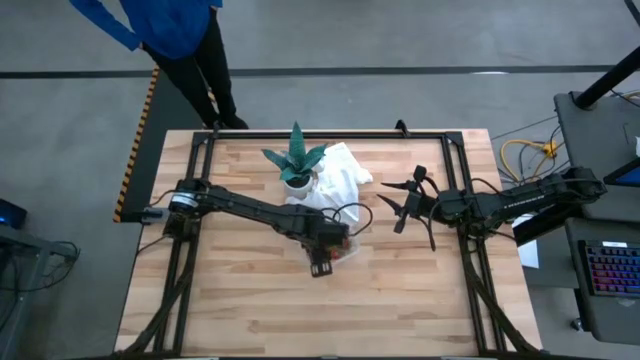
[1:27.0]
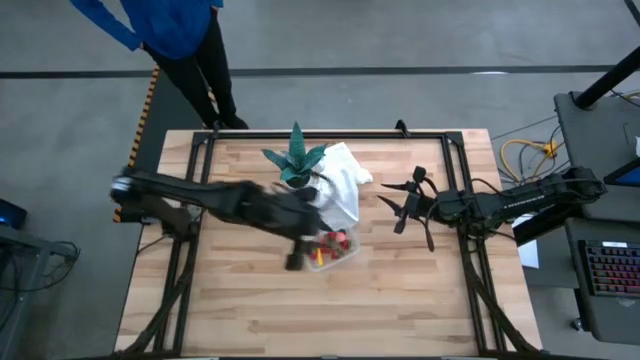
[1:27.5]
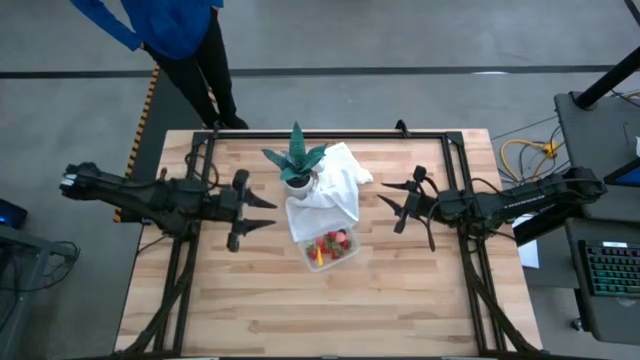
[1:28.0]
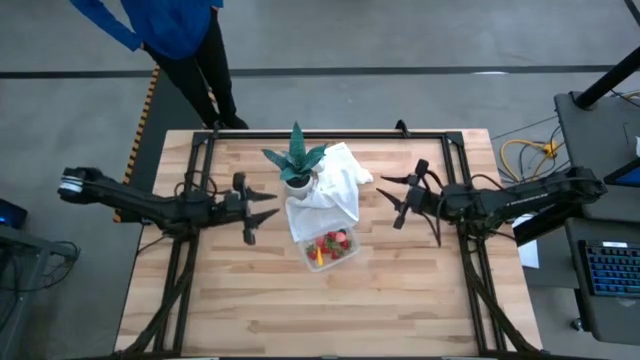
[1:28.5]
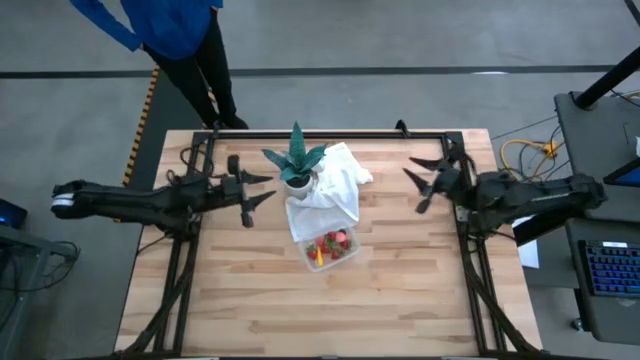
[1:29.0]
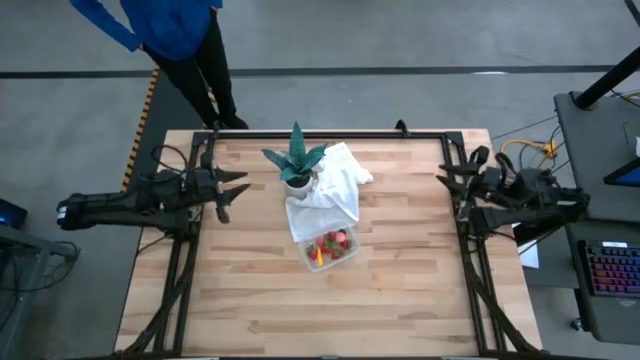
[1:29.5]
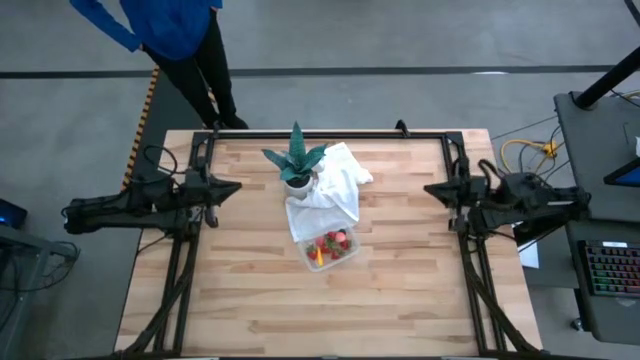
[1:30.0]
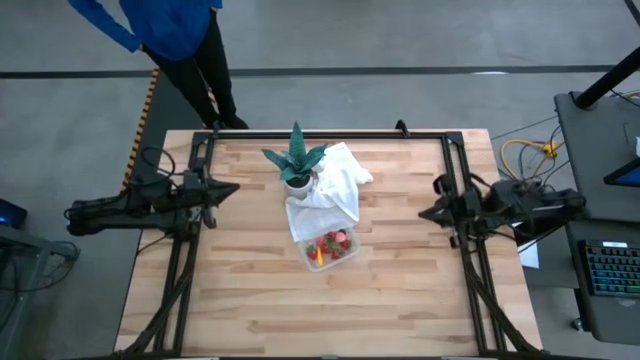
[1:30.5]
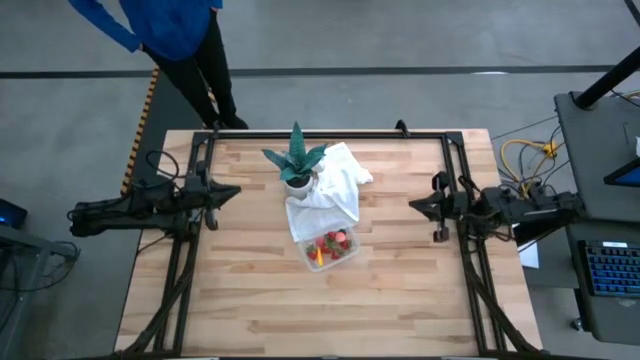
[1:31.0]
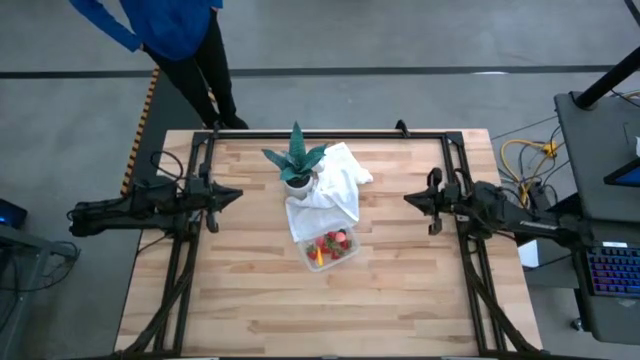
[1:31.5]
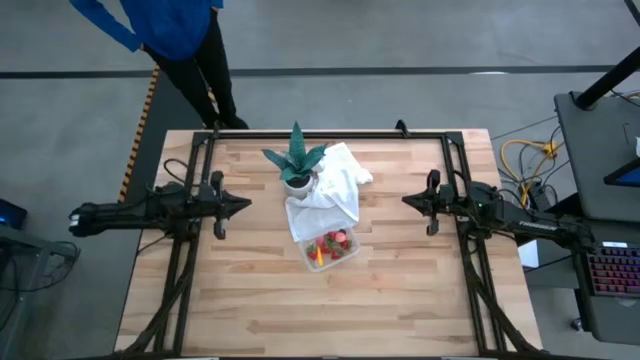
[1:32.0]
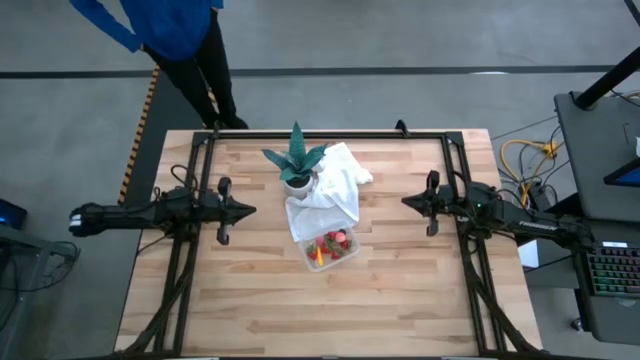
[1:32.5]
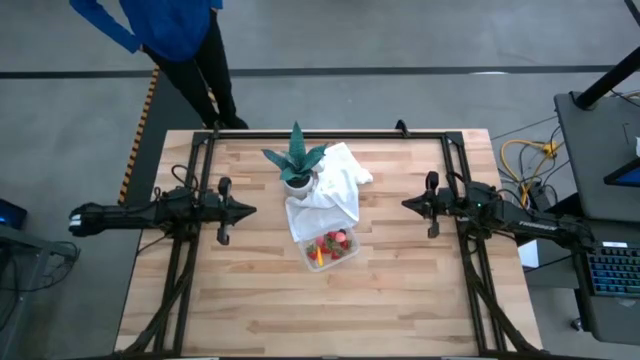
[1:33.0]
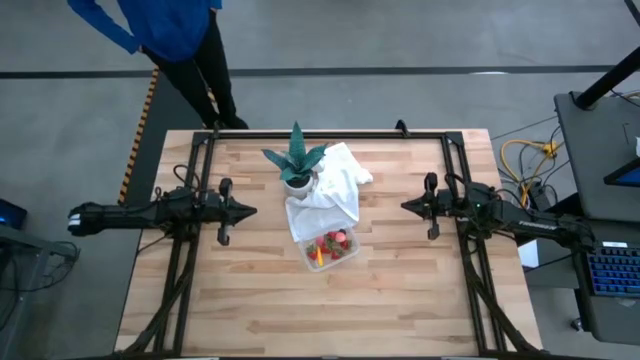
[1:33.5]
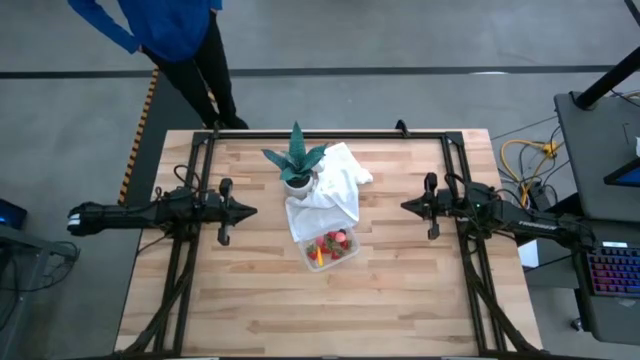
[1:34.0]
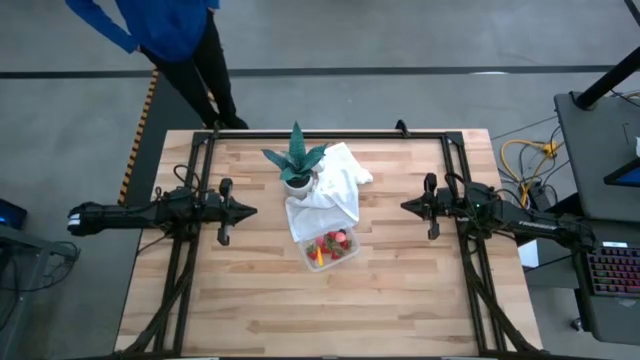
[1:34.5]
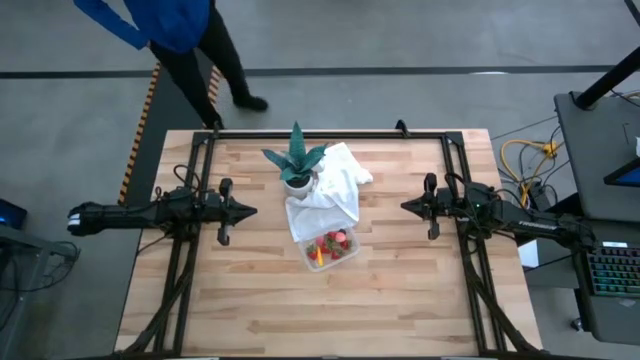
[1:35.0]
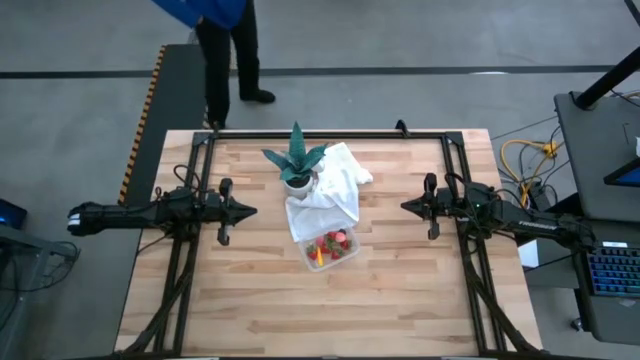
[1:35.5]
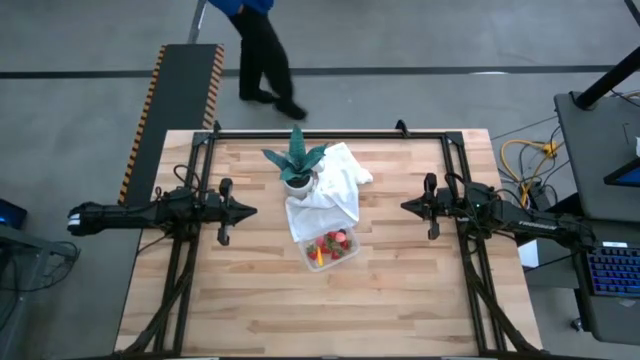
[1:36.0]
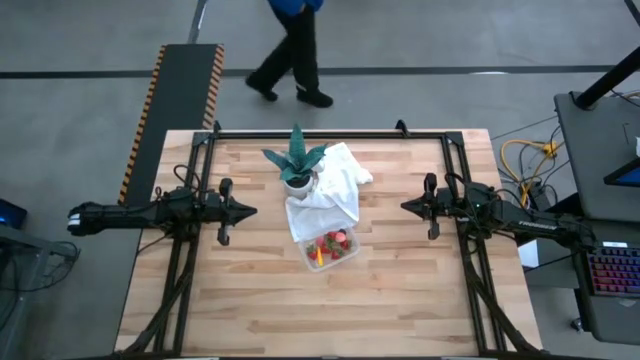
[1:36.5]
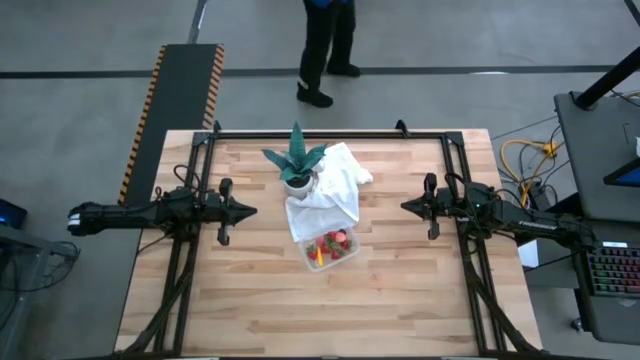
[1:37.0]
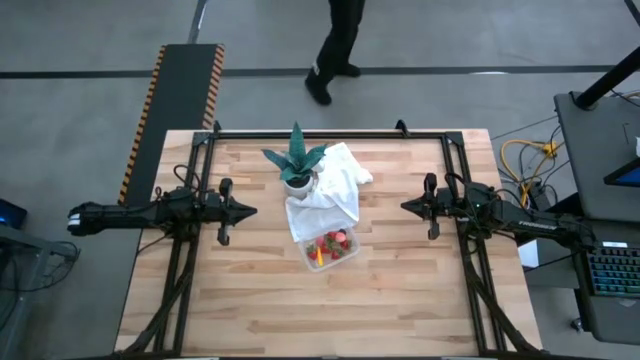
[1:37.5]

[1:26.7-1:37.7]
Task: Pick and placing Produce into tupperware
Return to Home Position

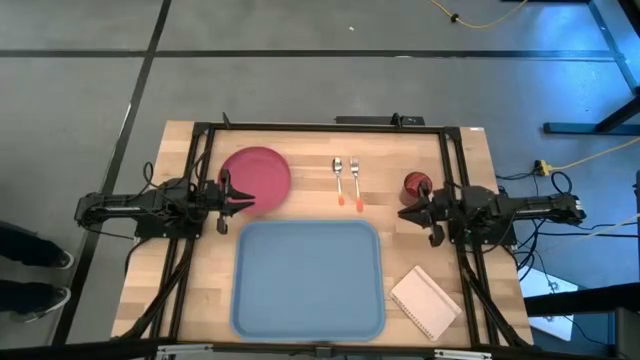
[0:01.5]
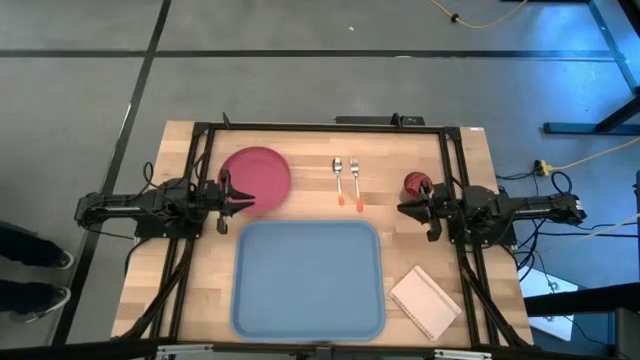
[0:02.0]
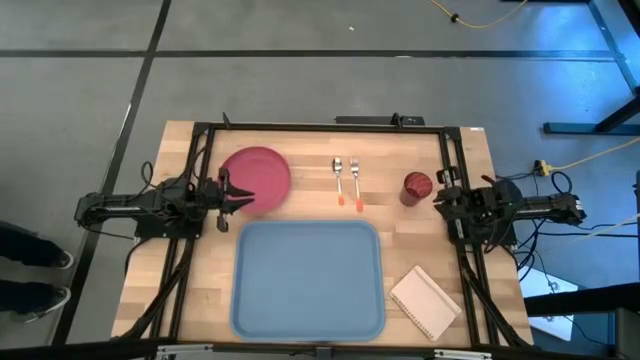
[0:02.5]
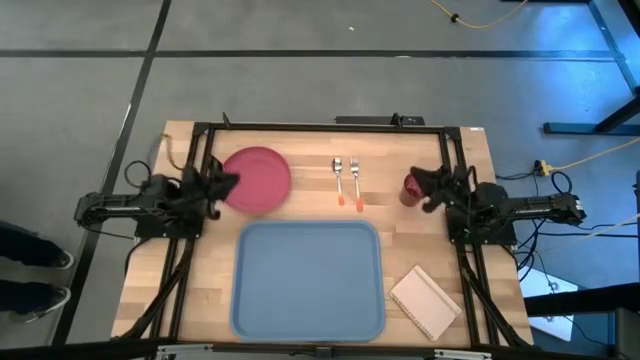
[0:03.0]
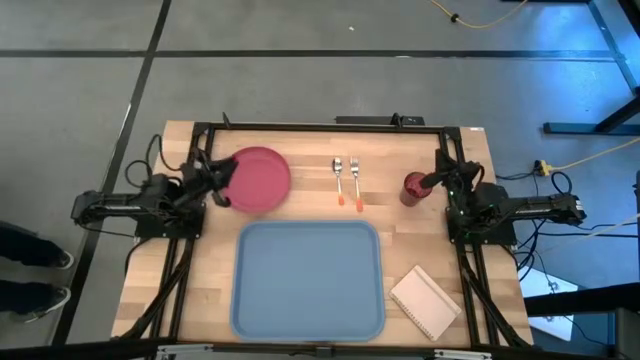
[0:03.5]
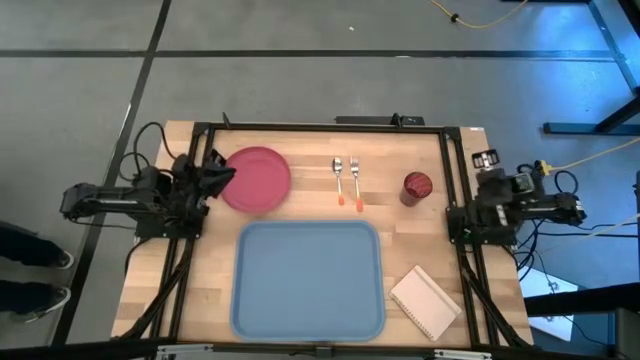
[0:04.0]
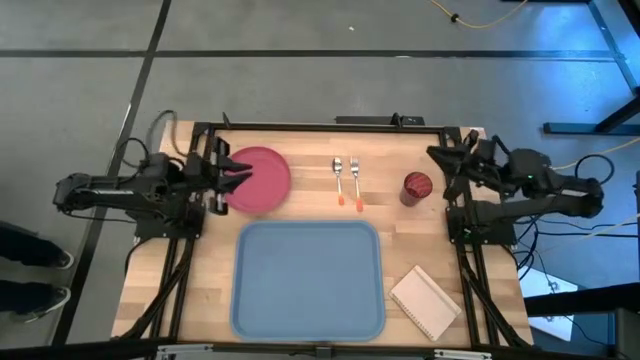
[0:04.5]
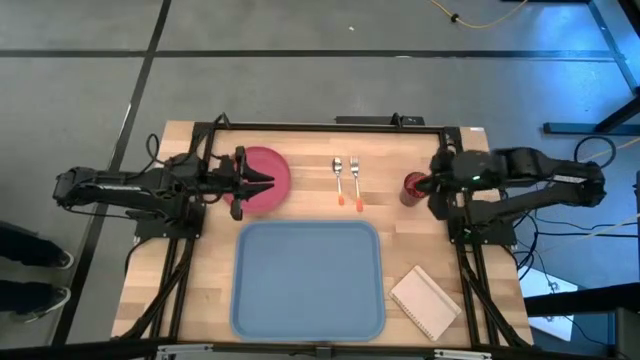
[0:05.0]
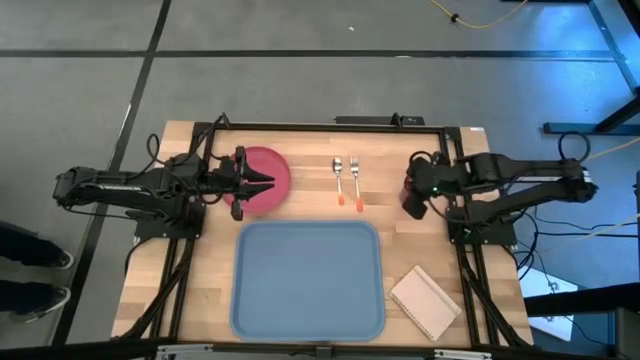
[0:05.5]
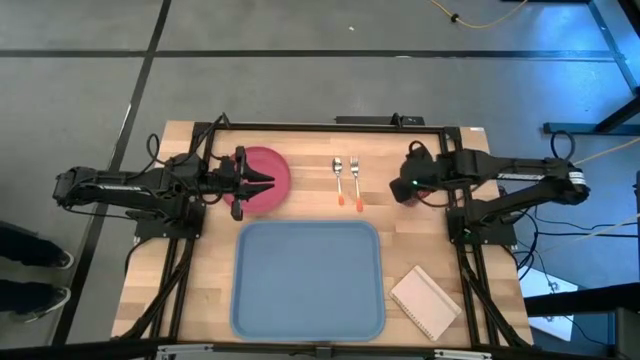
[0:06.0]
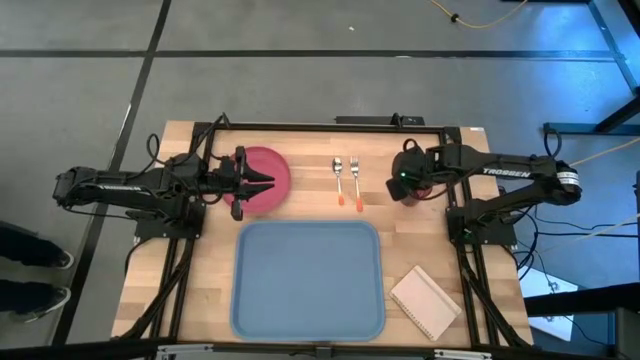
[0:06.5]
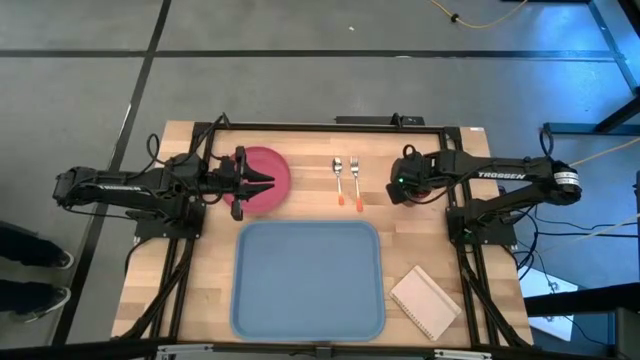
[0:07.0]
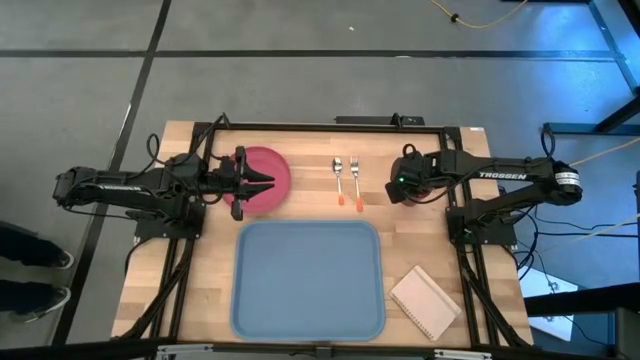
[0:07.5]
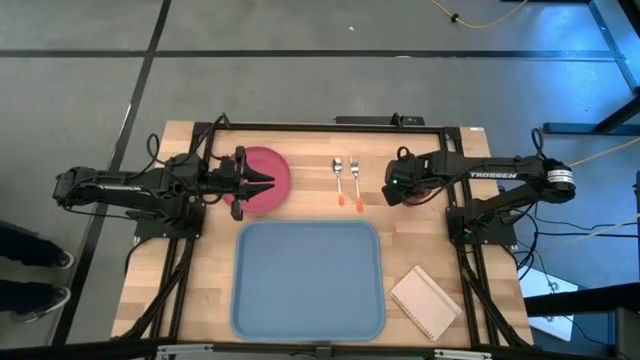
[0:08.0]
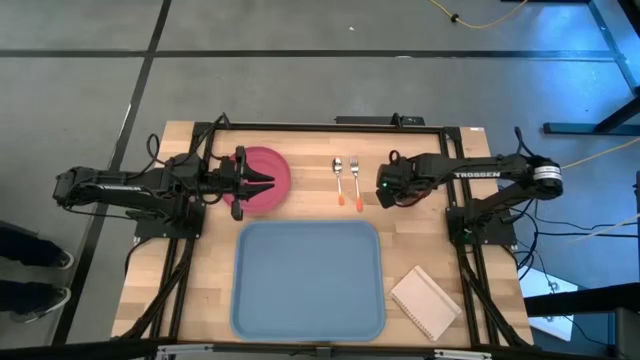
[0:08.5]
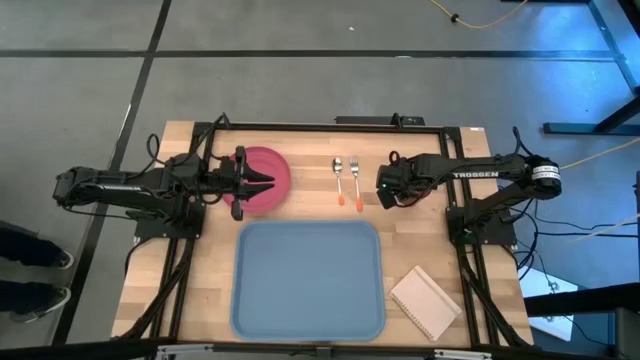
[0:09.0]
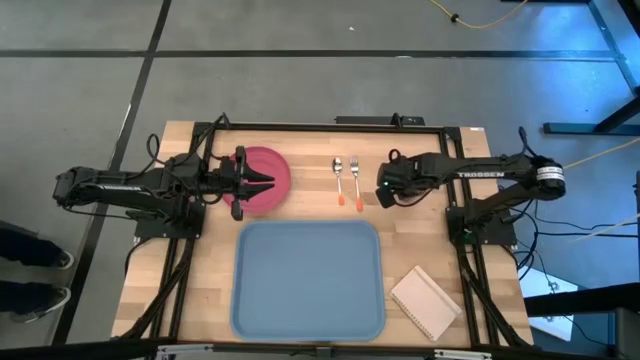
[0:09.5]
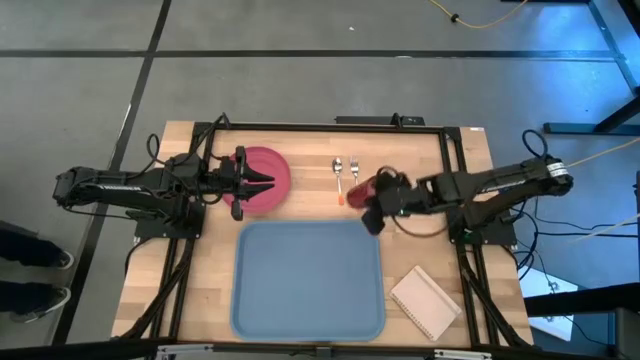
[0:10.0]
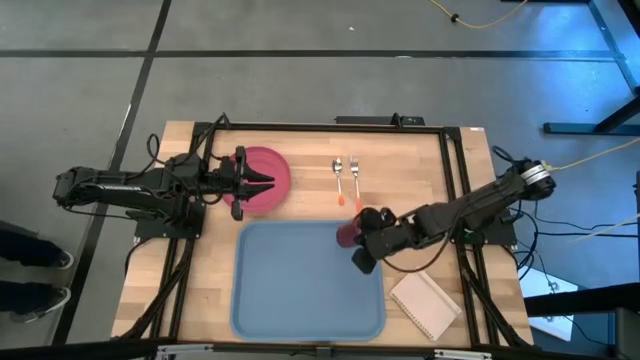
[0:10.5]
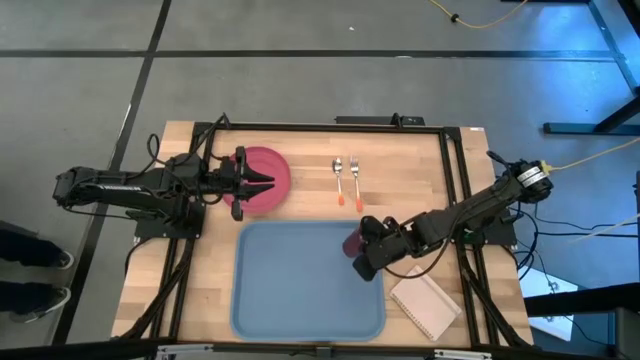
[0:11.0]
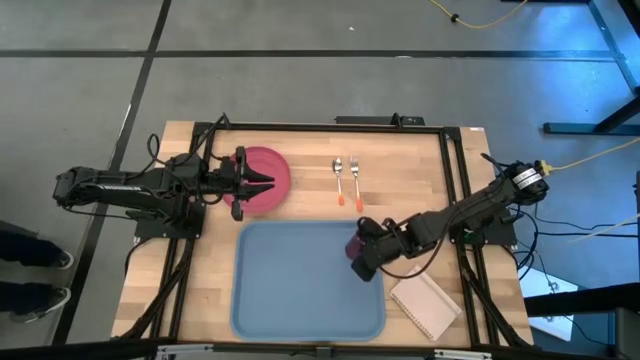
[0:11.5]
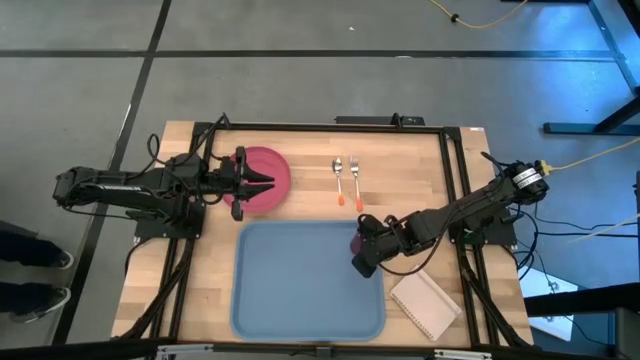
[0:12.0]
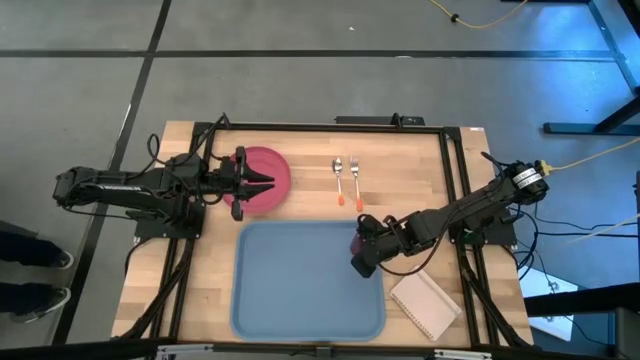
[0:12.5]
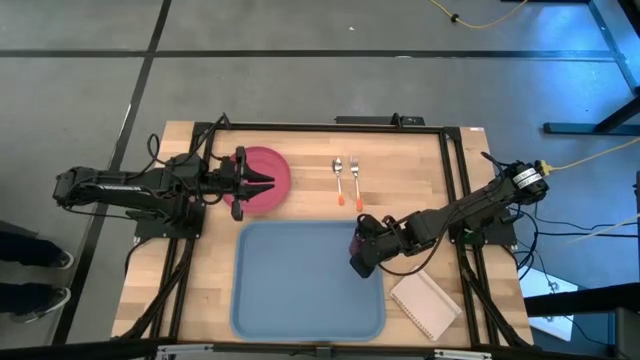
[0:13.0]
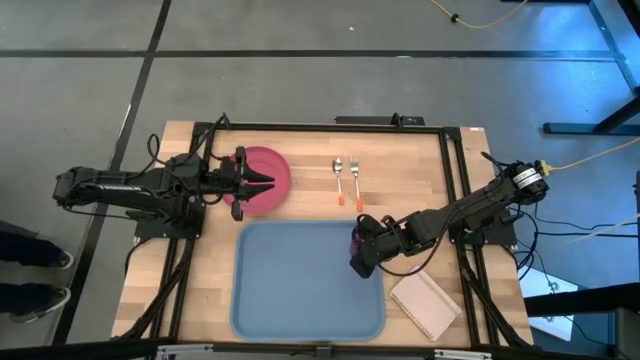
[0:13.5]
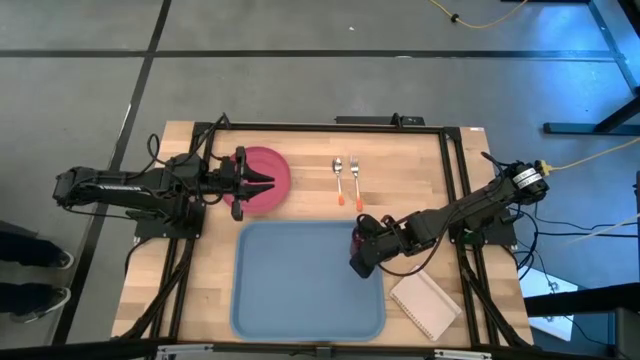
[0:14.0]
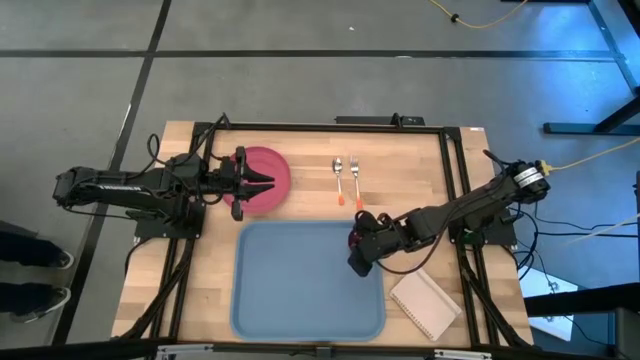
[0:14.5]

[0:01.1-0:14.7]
Task: Pick and place plate/cup/fork/spoon on tray
Put the red cup on the top right of the blue tray
